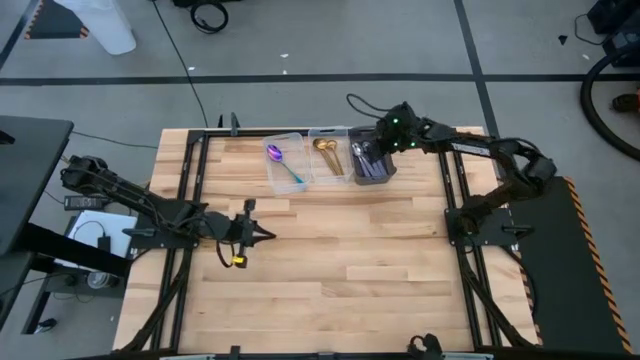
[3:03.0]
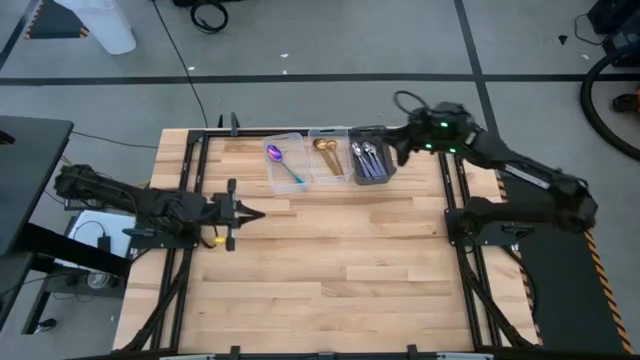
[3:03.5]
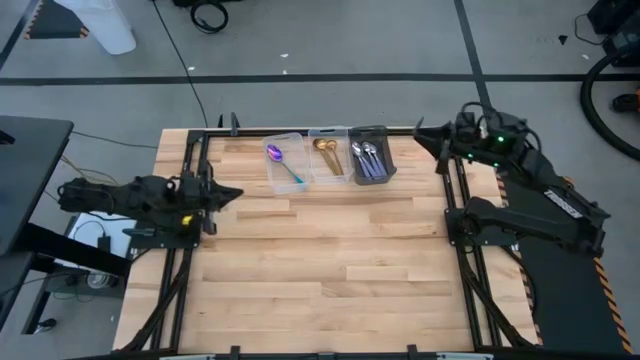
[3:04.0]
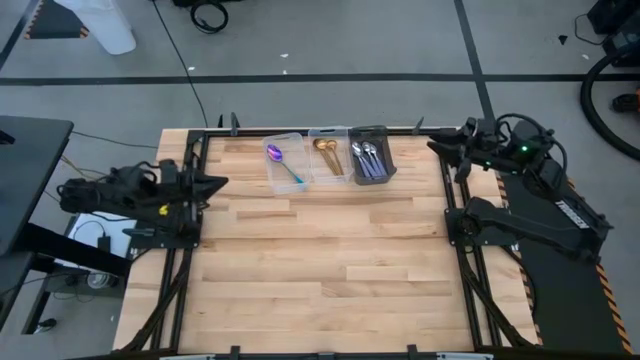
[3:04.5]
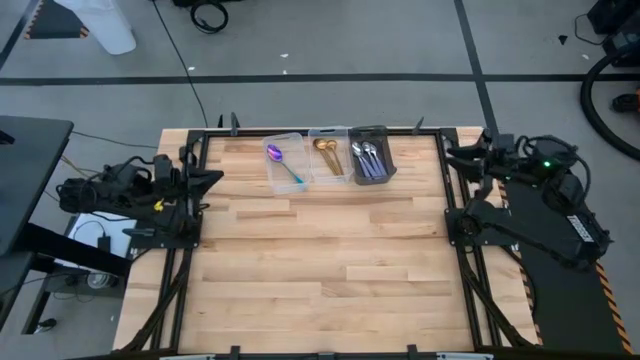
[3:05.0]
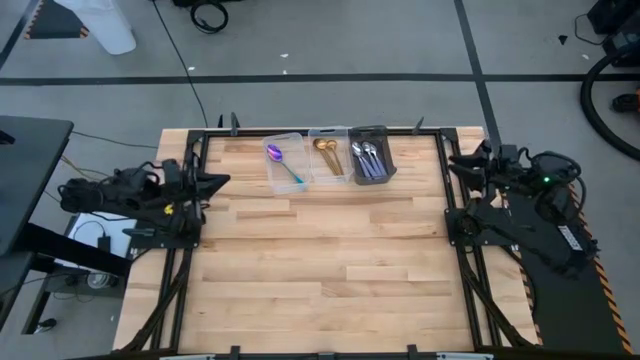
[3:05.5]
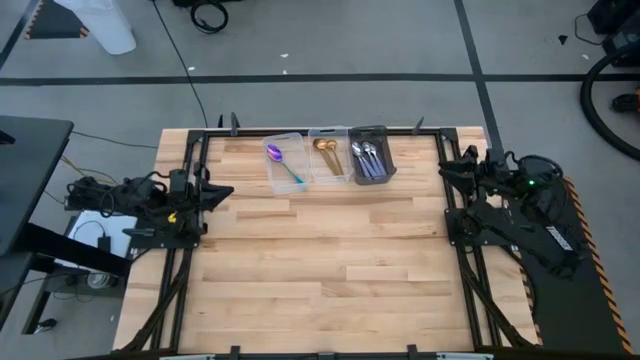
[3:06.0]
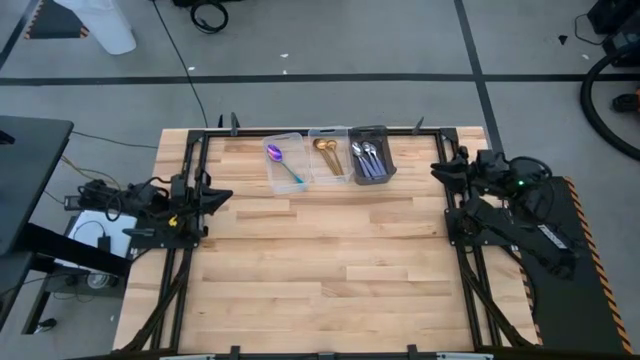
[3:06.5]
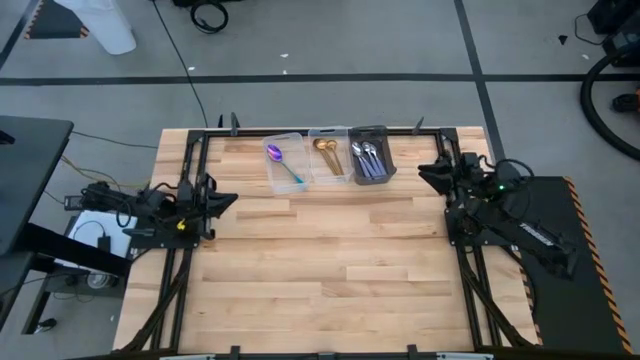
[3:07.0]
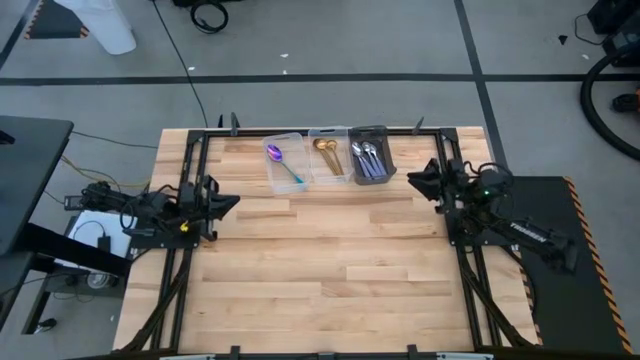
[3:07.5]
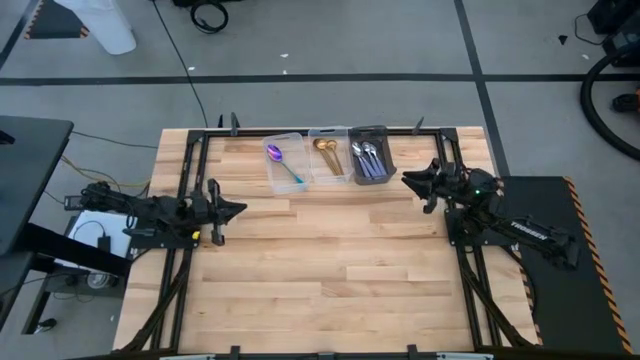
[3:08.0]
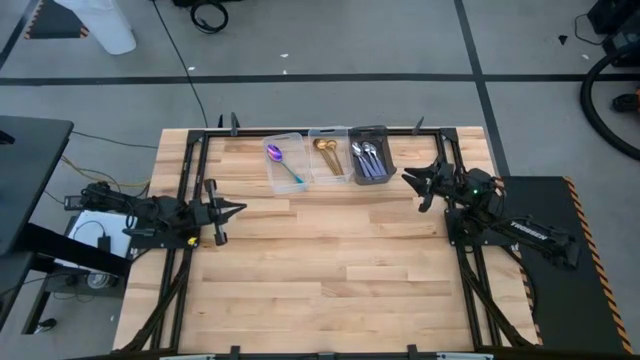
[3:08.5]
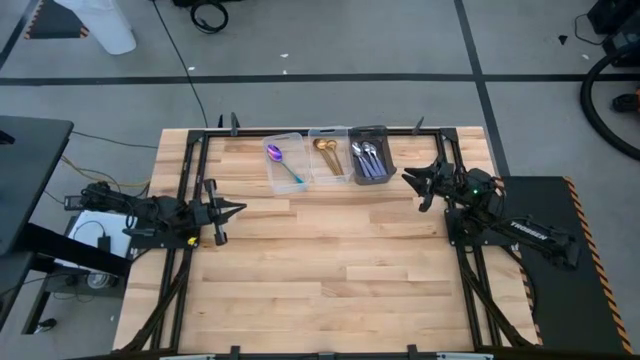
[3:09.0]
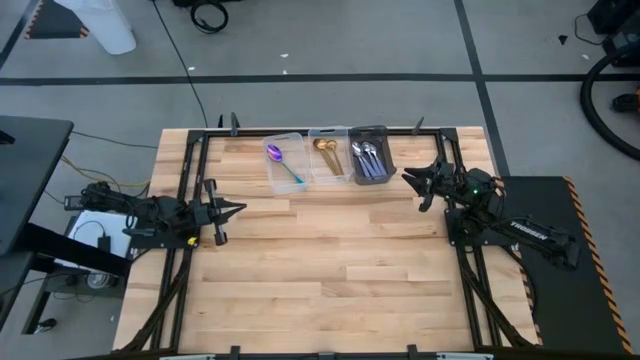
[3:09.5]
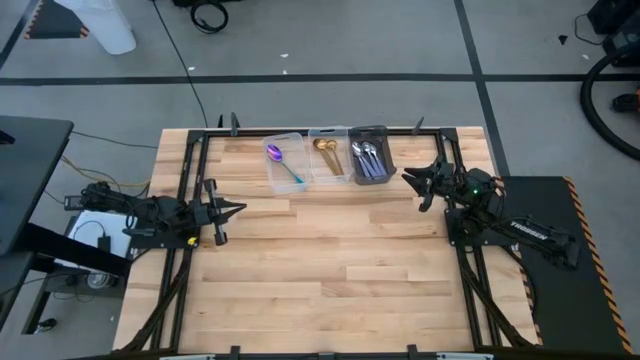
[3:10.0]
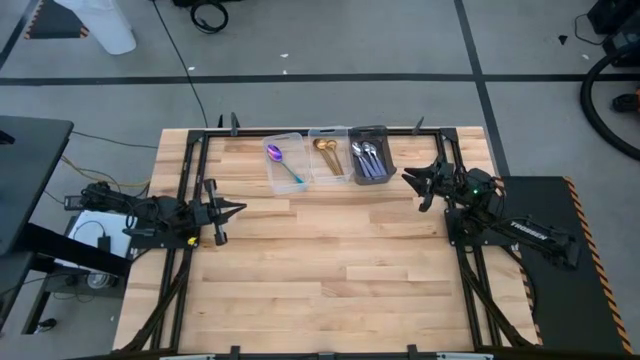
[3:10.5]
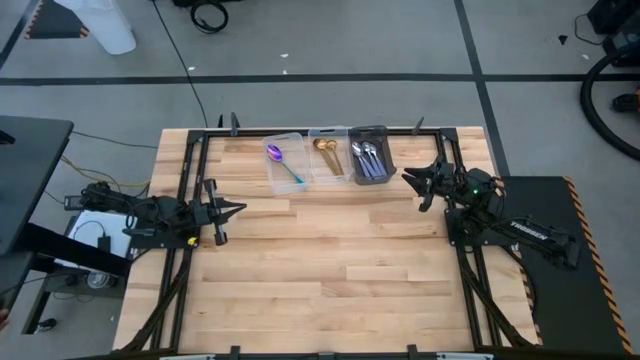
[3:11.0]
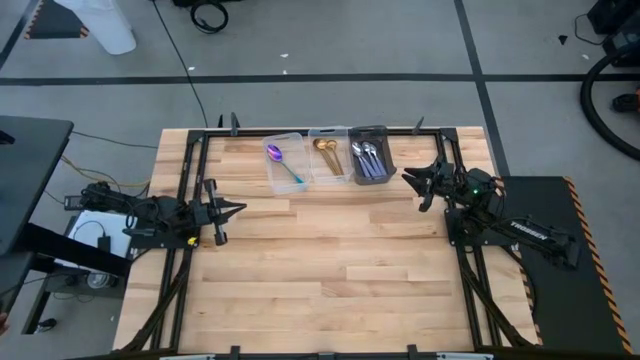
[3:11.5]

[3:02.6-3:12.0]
Task: Sort silverware by color (type)
Return to Home Position

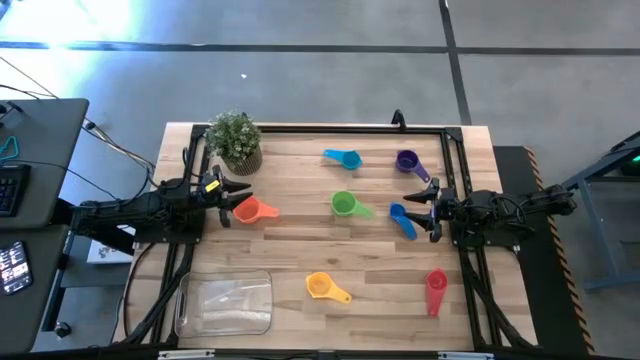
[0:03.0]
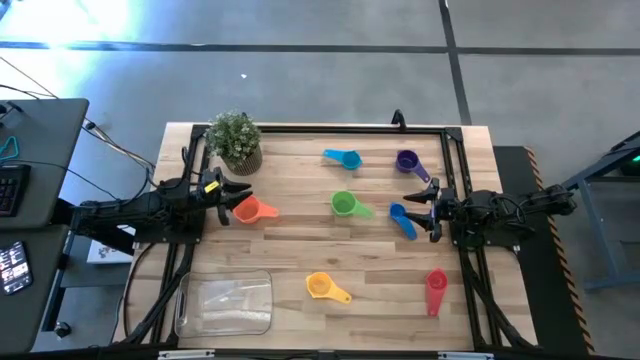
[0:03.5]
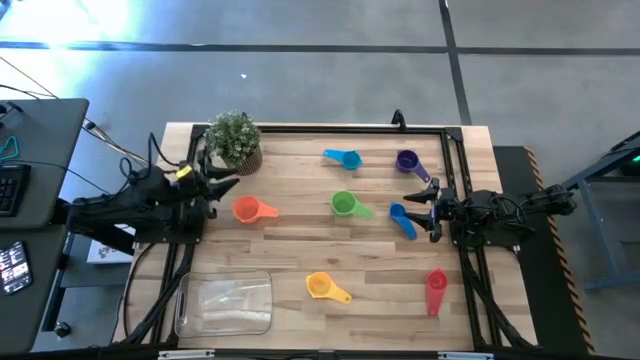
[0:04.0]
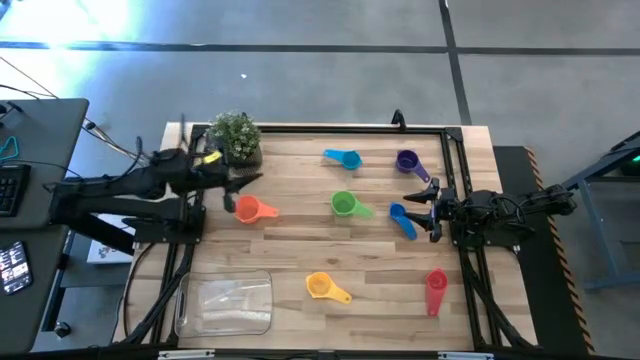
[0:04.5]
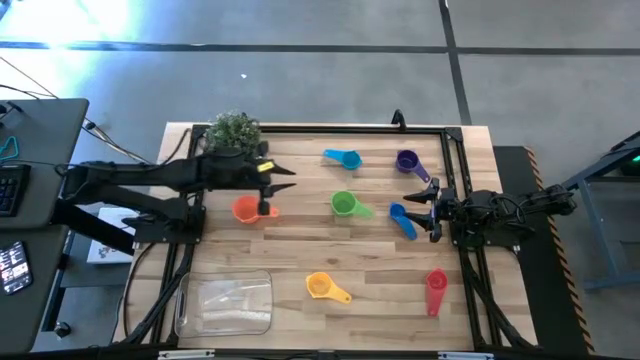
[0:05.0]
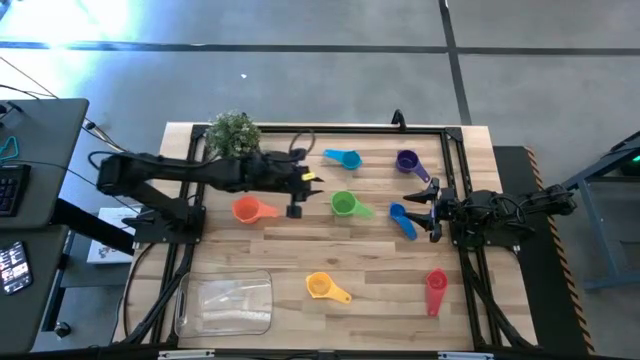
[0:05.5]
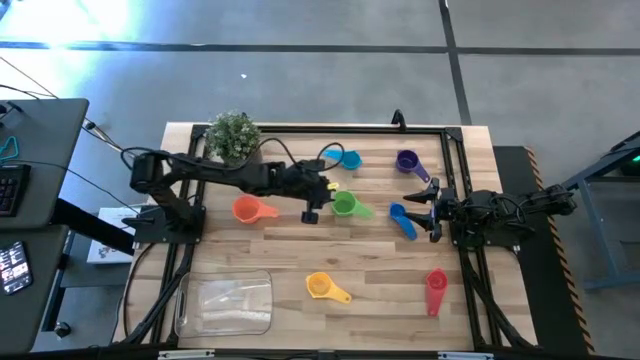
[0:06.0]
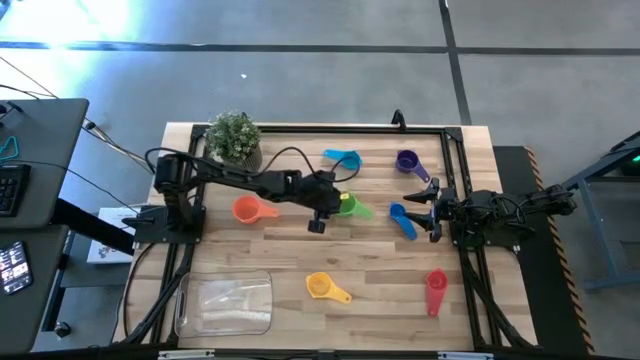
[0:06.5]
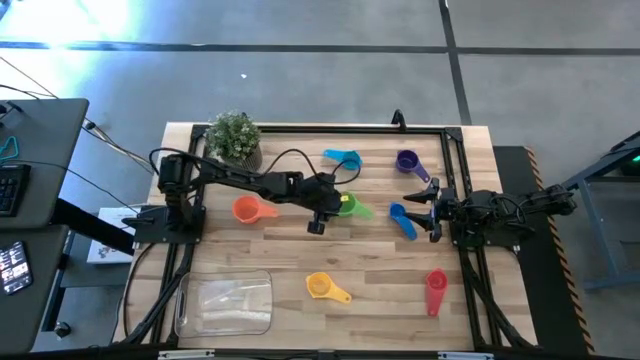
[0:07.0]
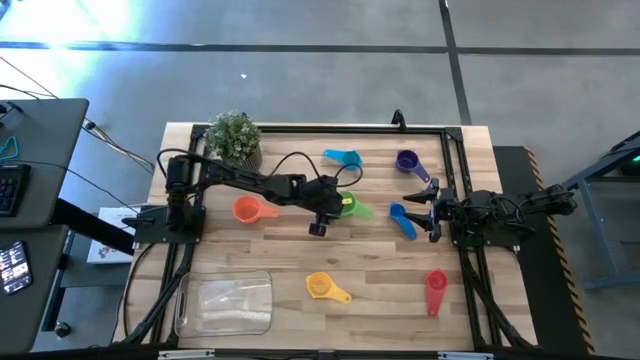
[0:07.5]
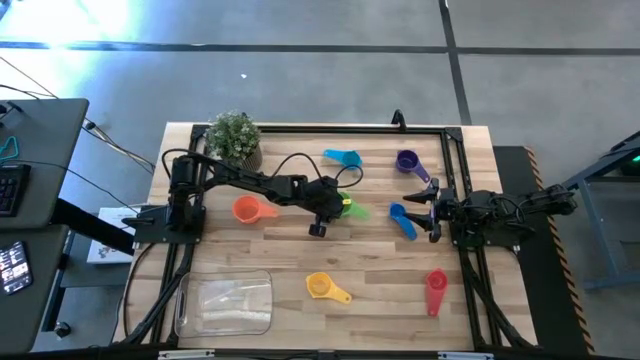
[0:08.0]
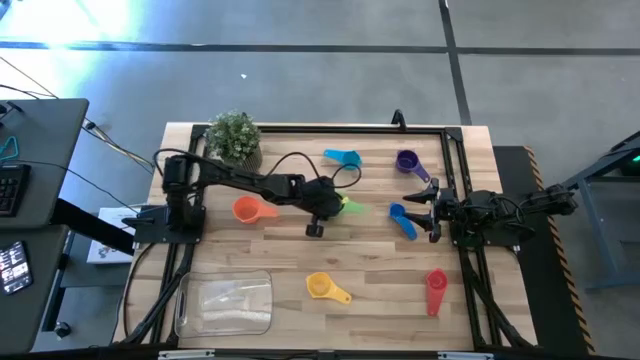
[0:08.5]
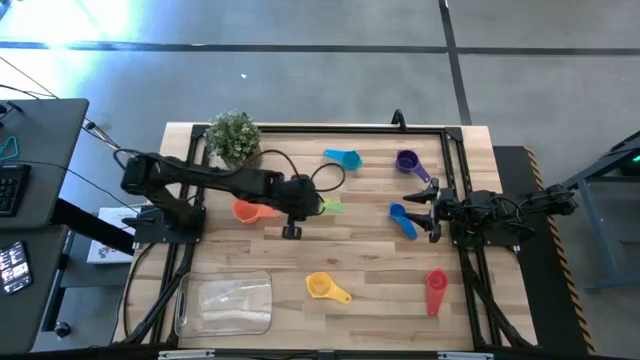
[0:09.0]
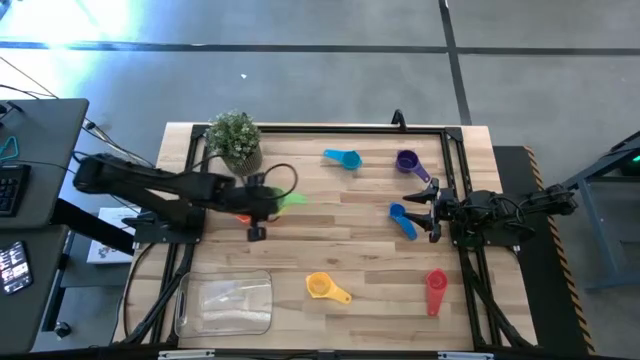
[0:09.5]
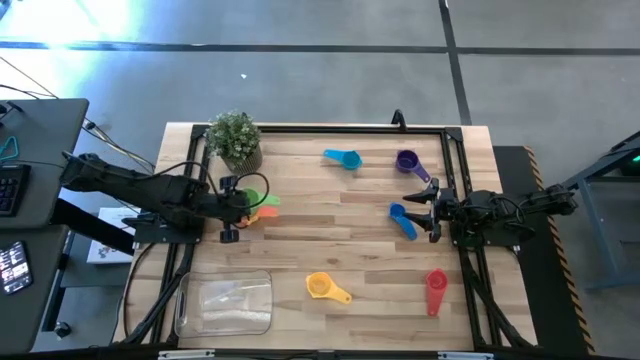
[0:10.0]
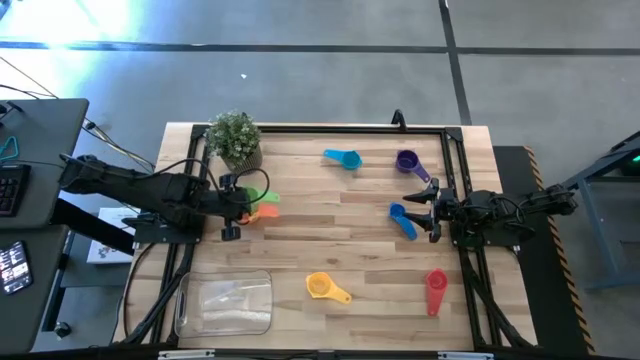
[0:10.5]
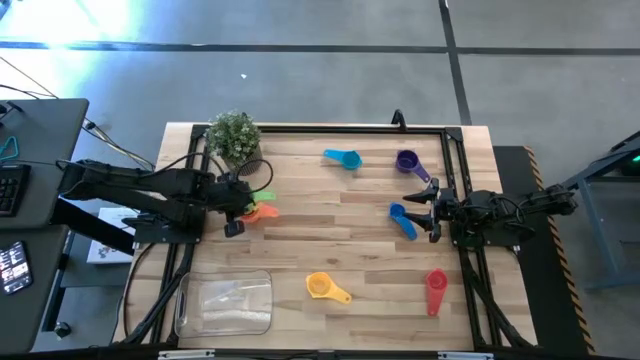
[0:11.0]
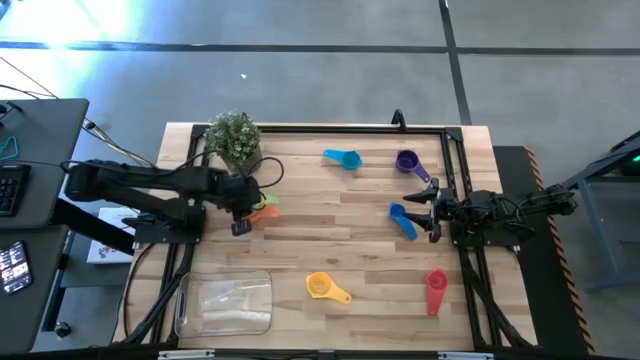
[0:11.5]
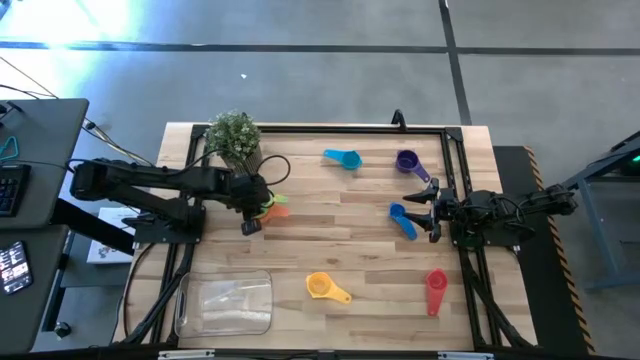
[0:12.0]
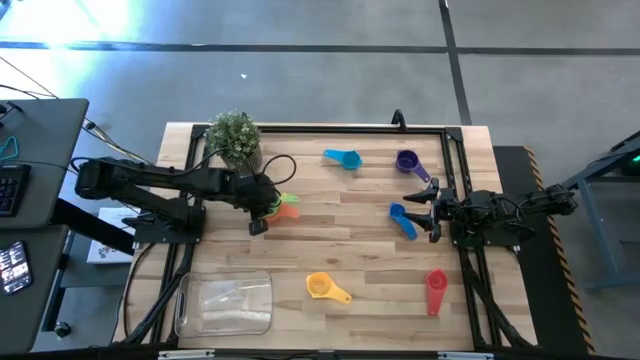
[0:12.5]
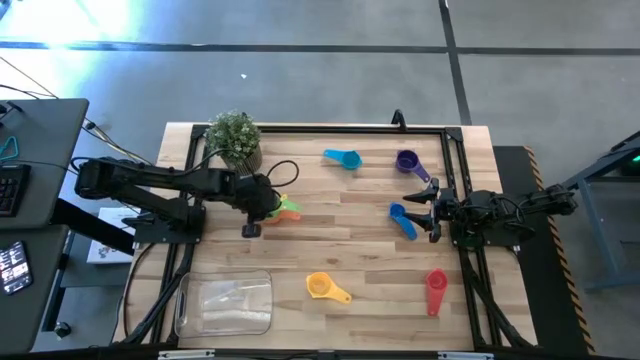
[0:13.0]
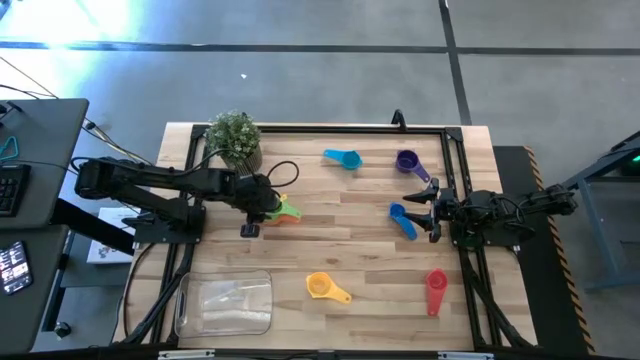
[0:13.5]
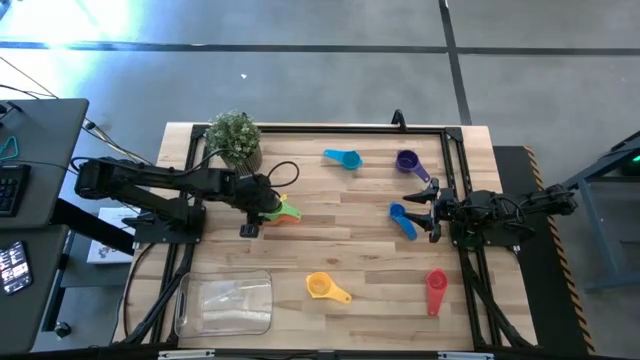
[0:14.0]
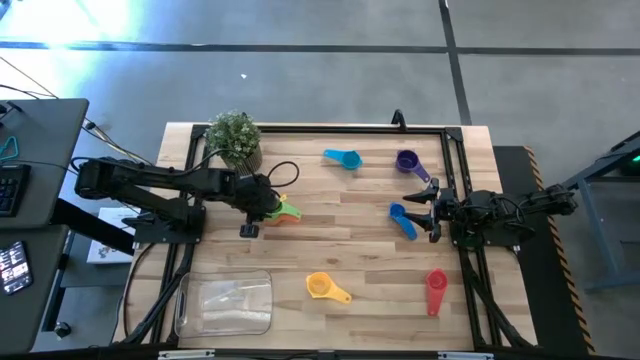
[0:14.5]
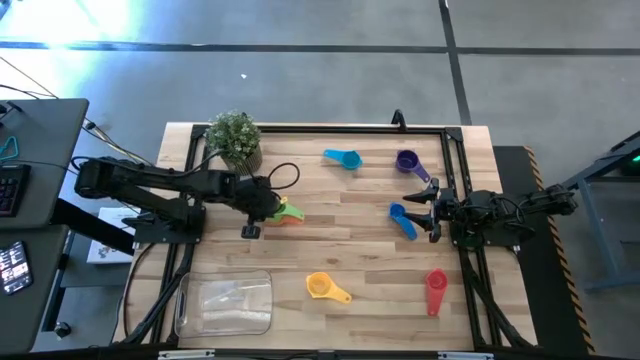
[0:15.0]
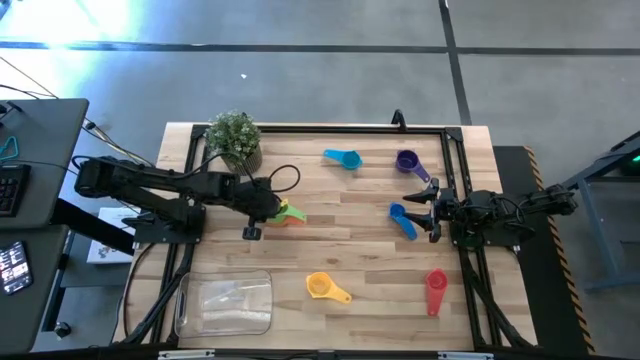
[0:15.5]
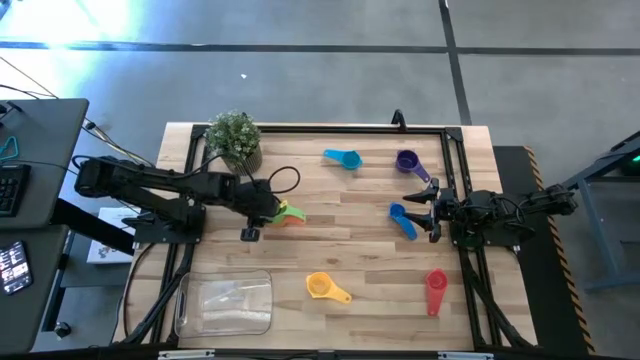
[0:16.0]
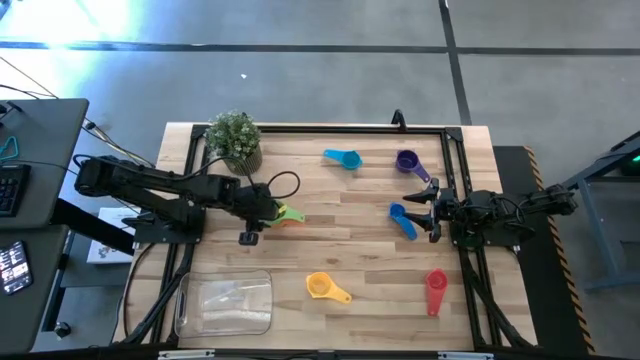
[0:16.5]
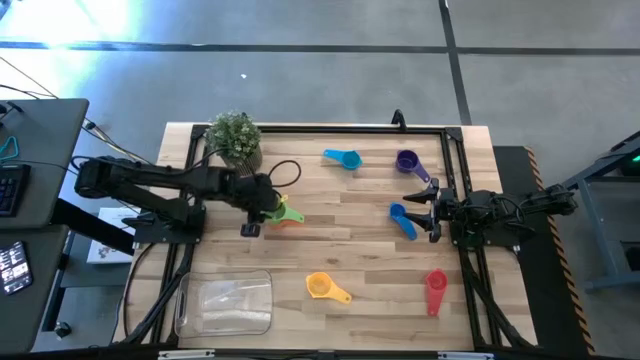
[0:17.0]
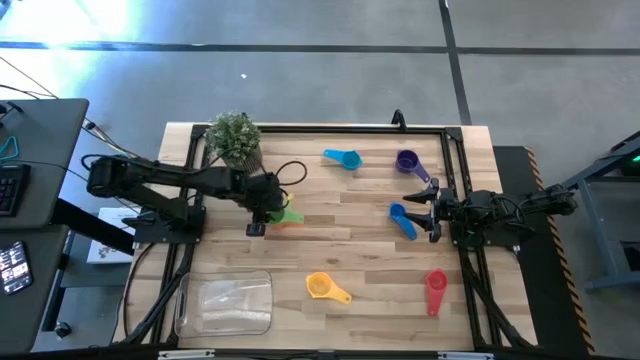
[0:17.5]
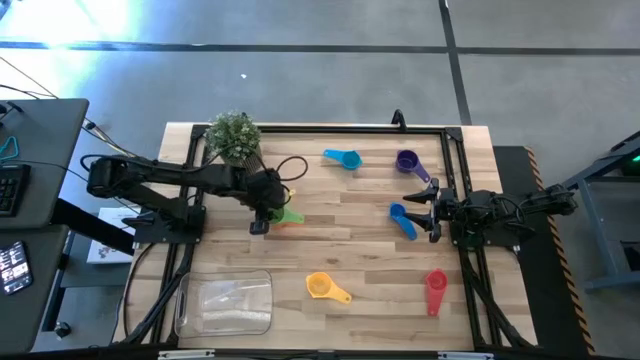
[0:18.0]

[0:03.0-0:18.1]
Task: Nest measuring cups in basket
Stack the green measuring cup on the orange measuring cup
